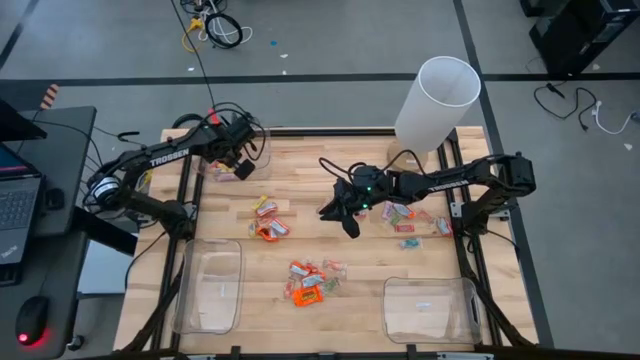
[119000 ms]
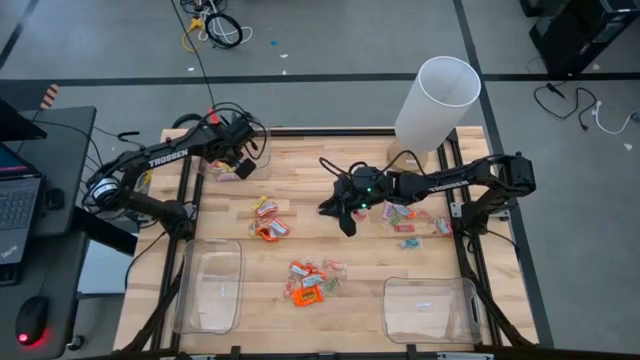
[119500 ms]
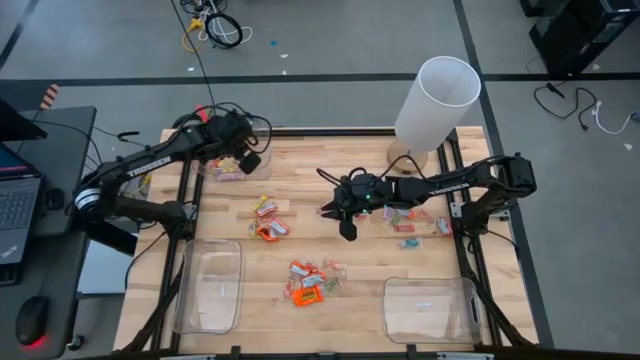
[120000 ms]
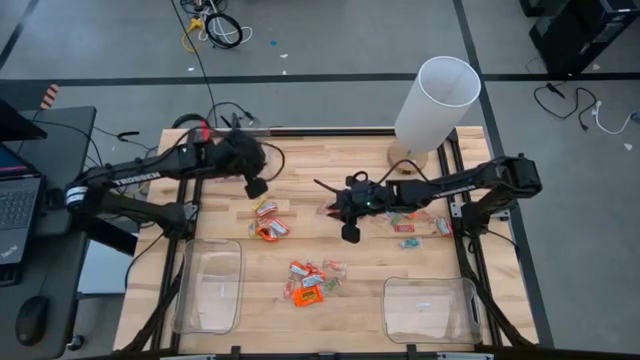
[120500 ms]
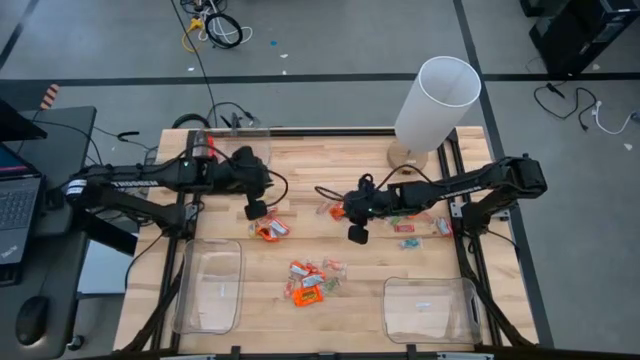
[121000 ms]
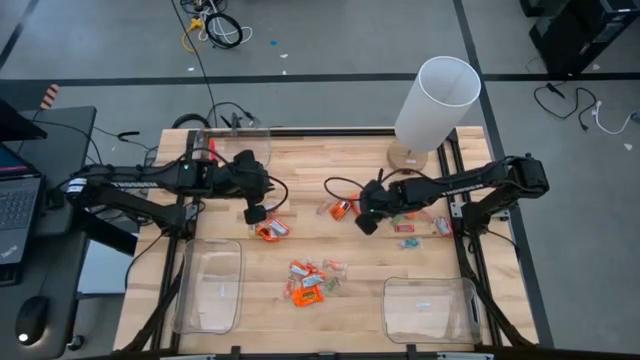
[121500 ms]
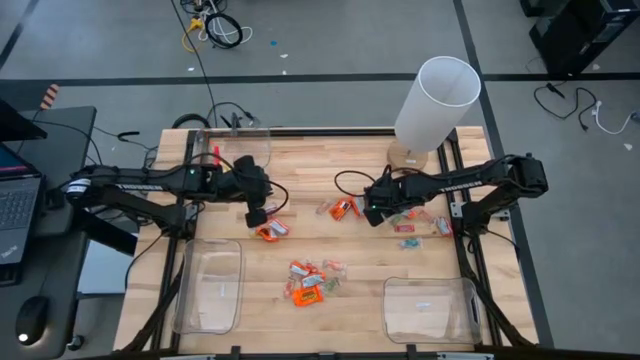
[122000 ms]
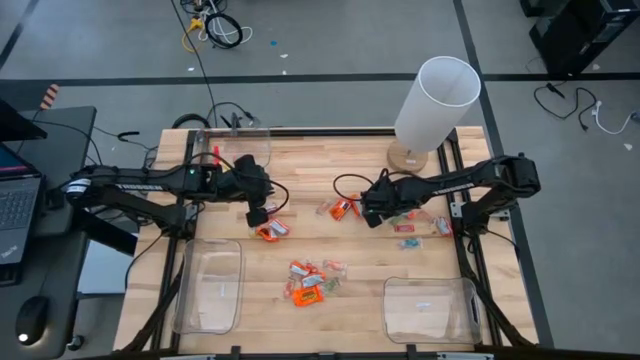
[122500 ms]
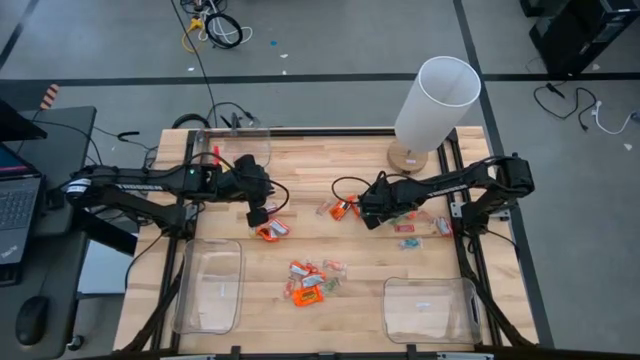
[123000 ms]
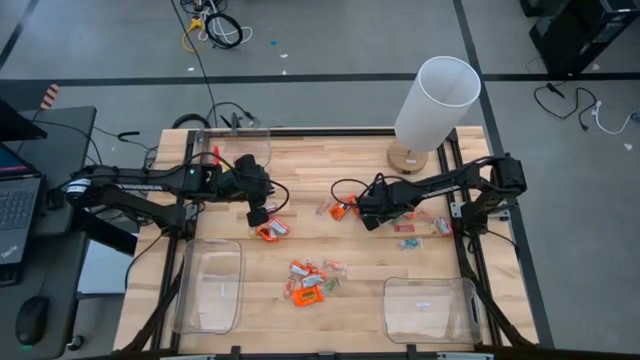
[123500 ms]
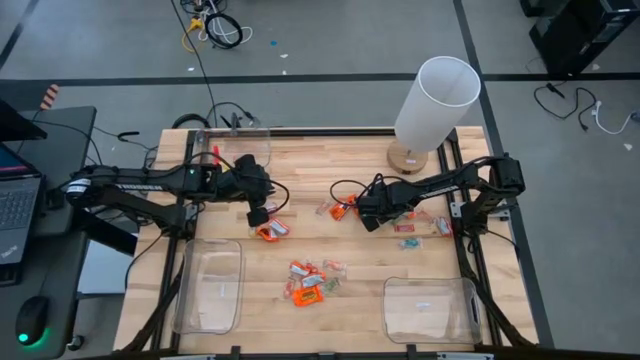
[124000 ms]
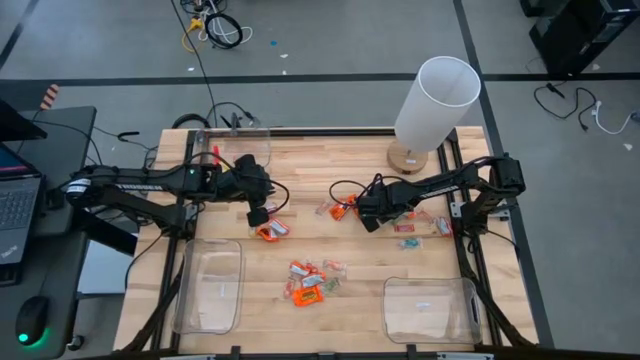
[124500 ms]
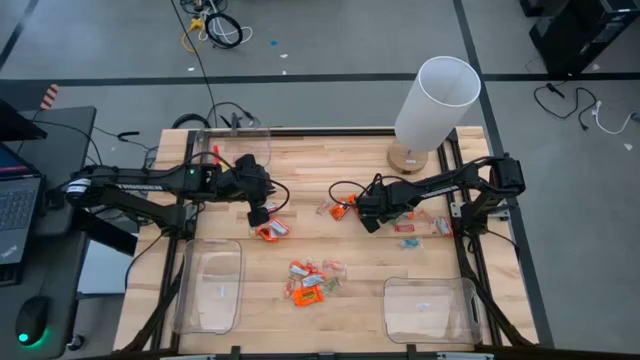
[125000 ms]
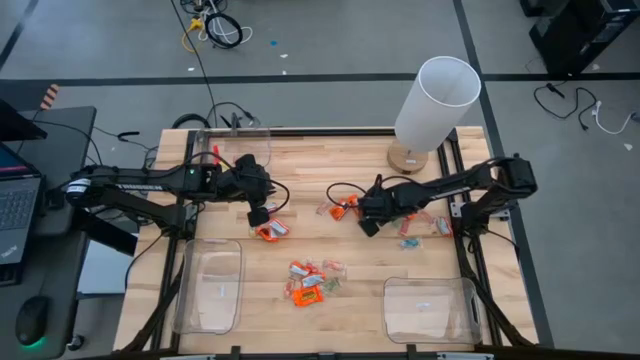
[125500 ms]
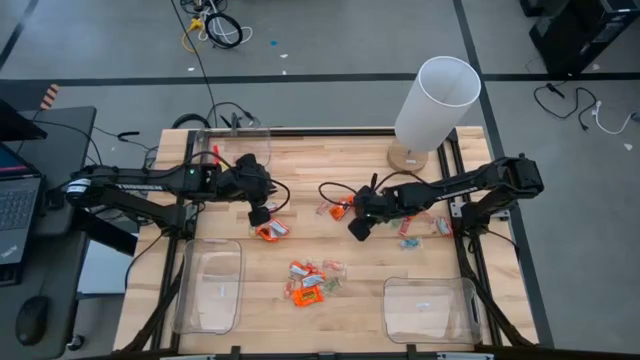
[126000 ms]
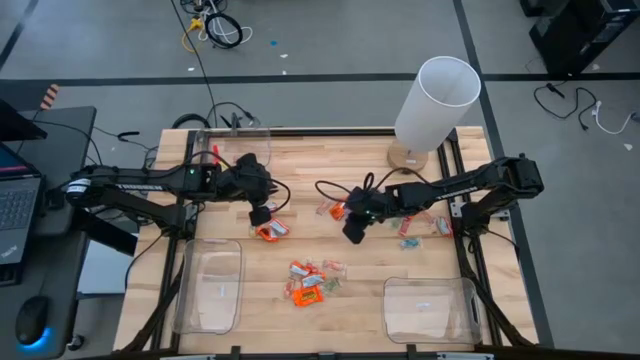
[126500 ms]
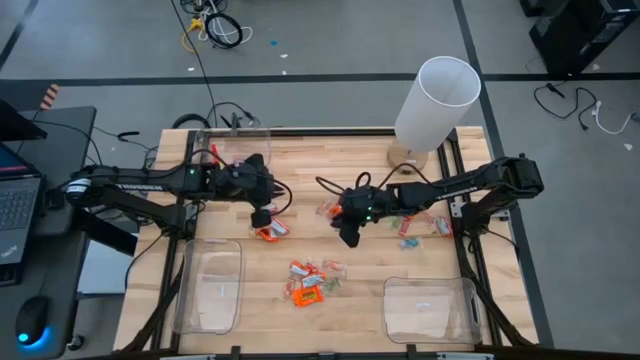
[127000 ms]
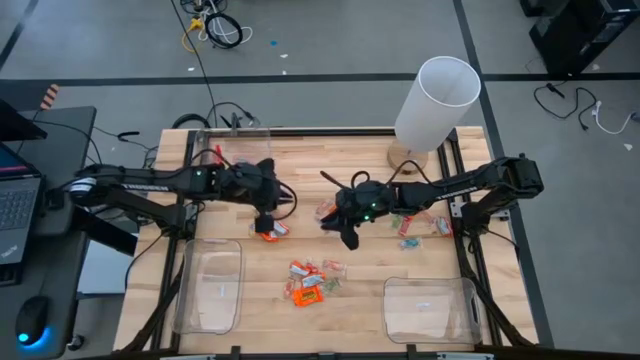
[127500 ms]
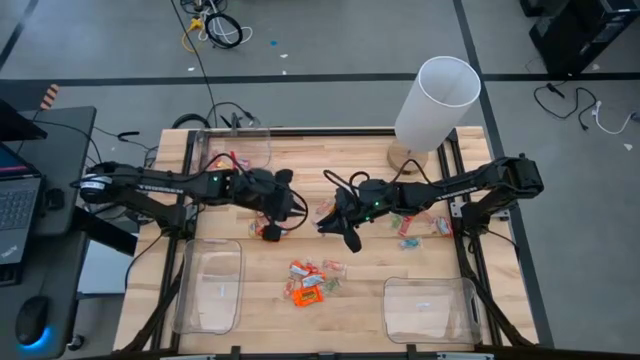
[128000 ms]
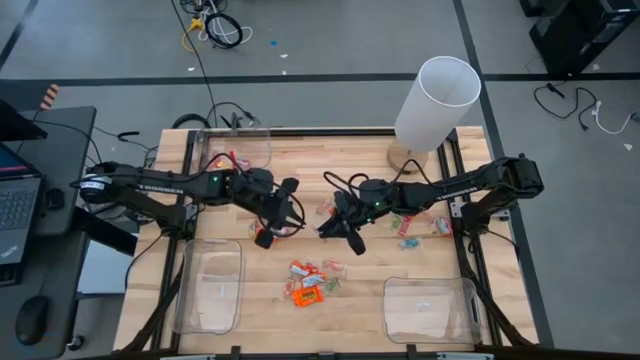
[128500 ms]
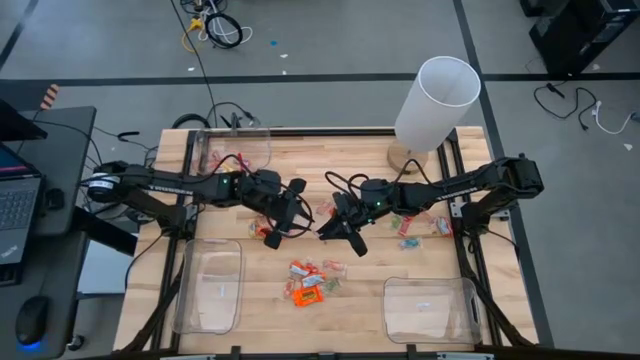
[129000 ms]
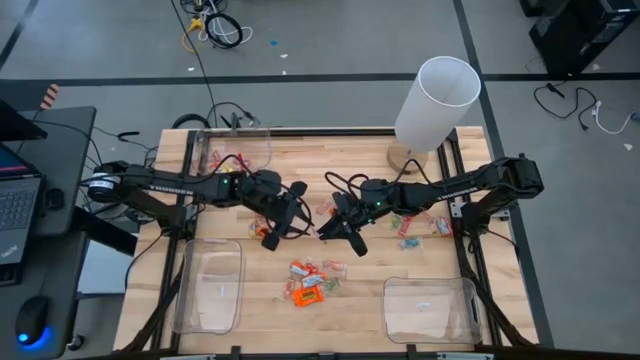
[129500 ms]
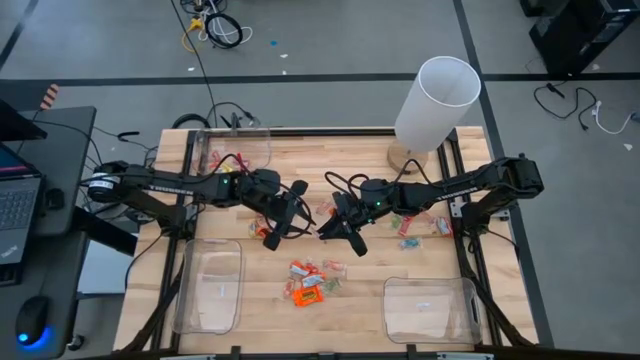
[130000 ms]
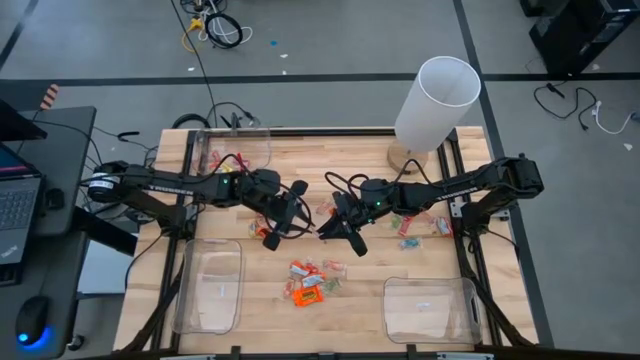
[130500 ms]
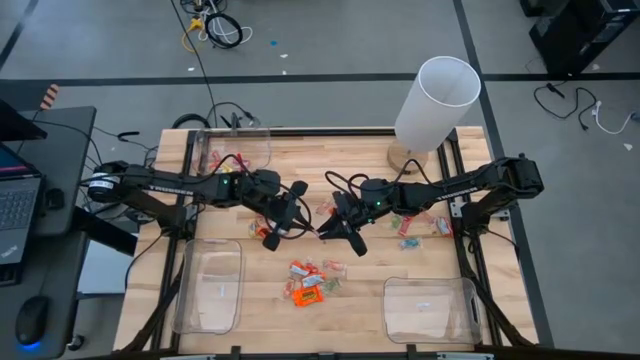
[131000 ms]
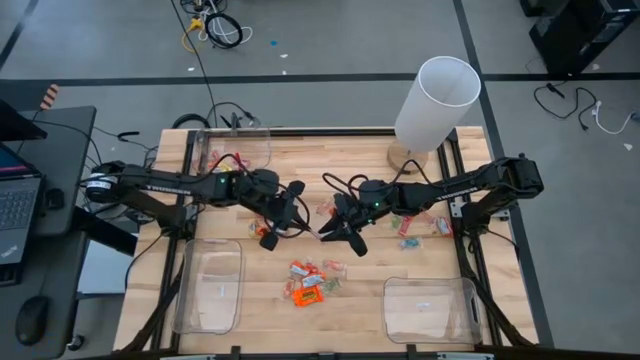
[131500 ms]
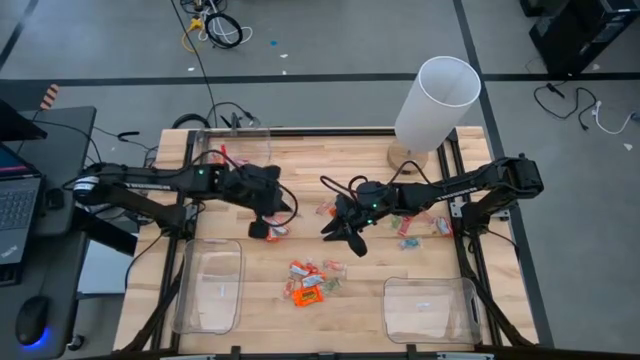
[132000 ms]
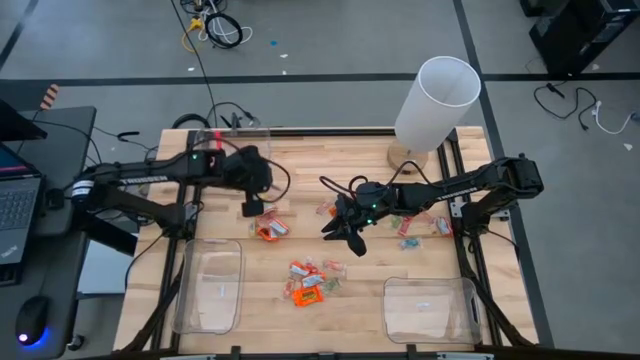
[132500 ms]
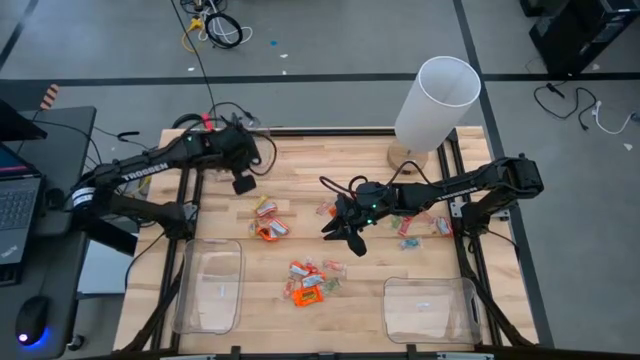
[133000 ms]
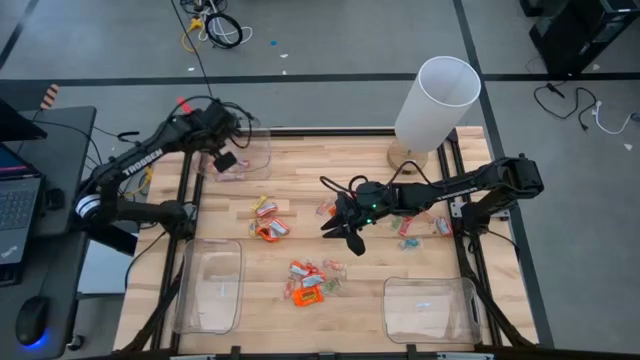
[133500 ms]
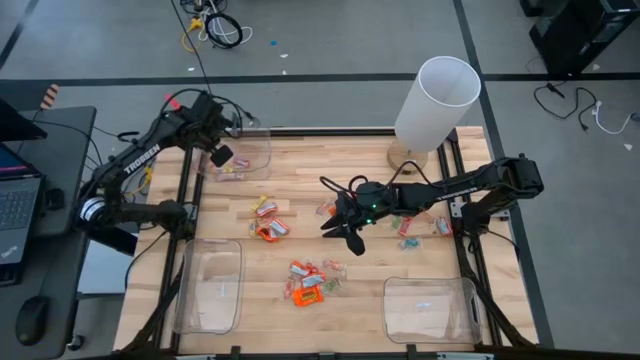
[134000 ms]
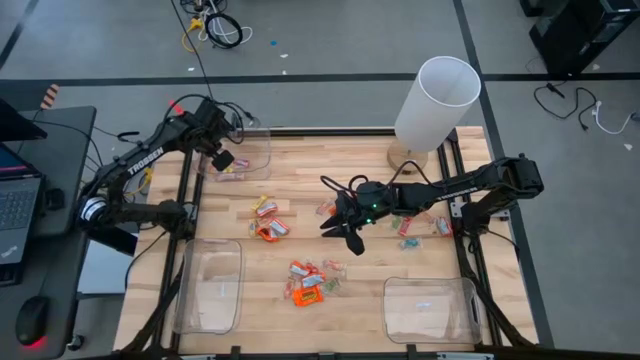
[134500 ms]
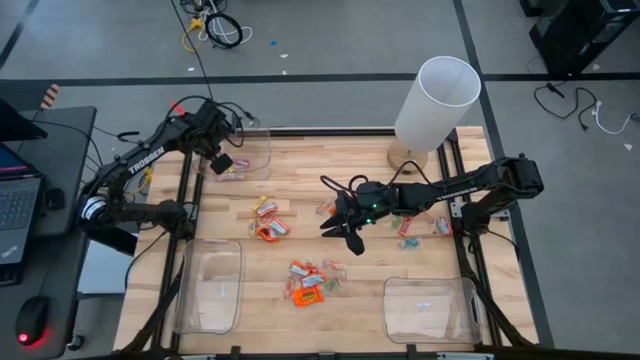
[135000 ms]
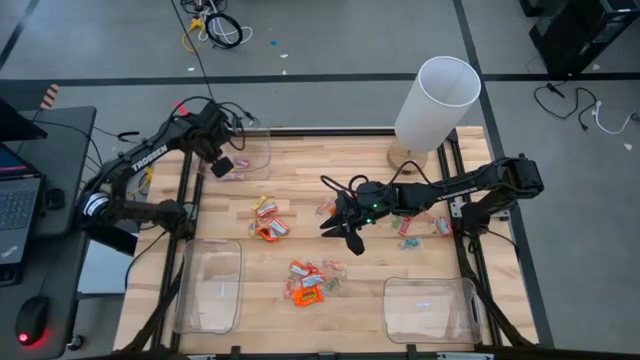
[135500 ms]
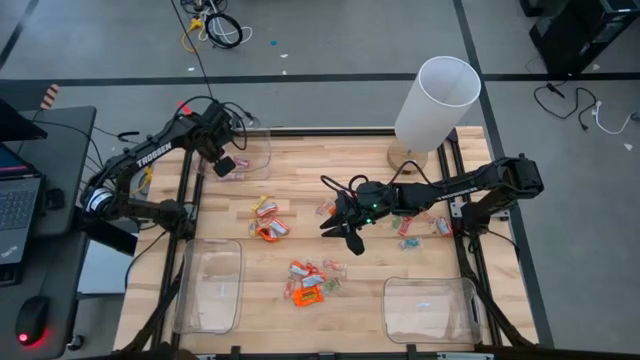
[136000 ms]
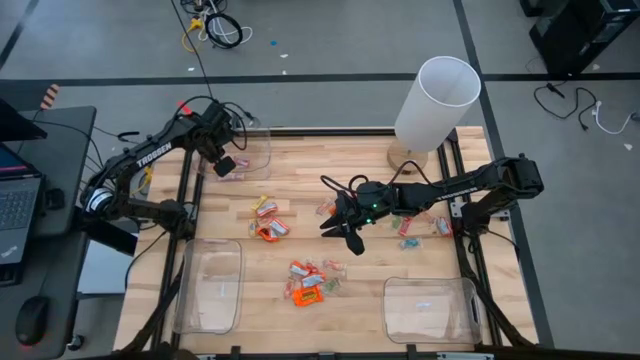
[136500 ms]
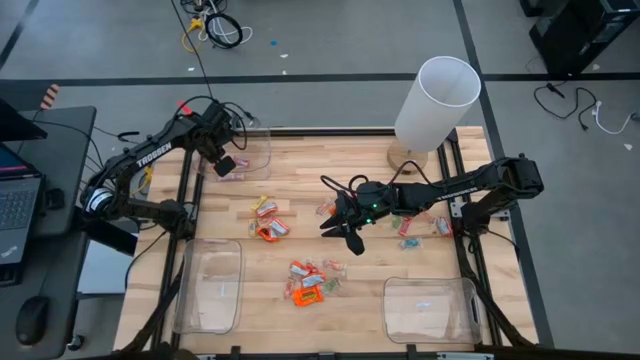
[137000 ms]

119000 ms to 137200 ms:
Task: Sort candy
Put the pink candy into the top left transparent bin

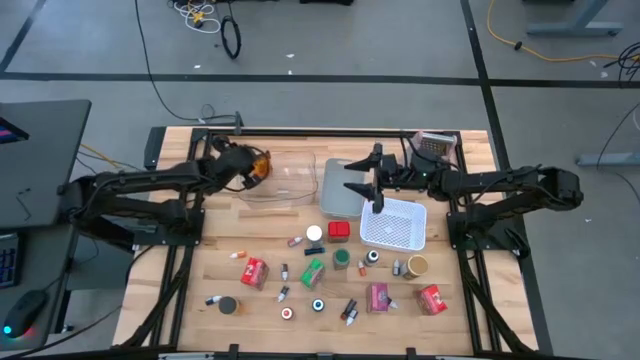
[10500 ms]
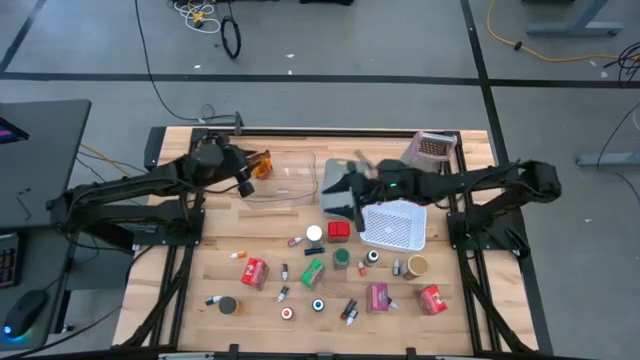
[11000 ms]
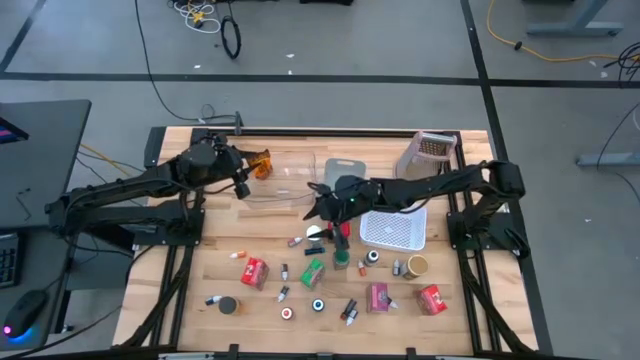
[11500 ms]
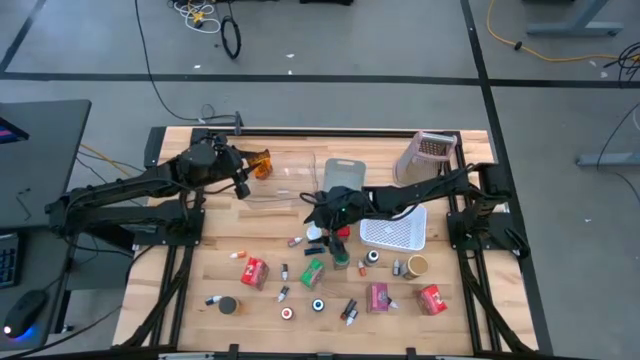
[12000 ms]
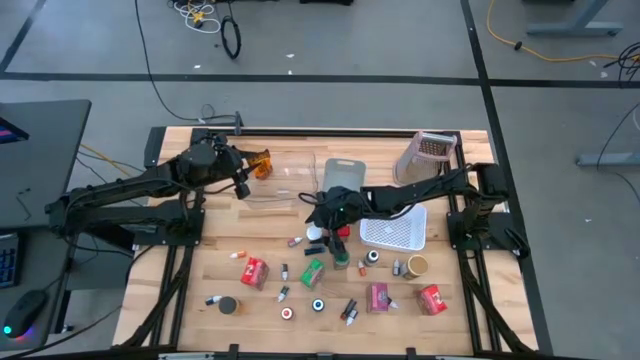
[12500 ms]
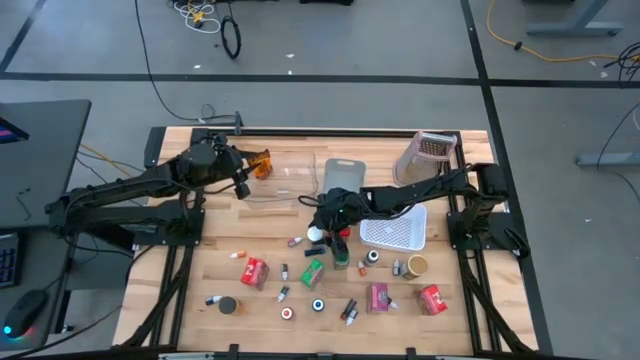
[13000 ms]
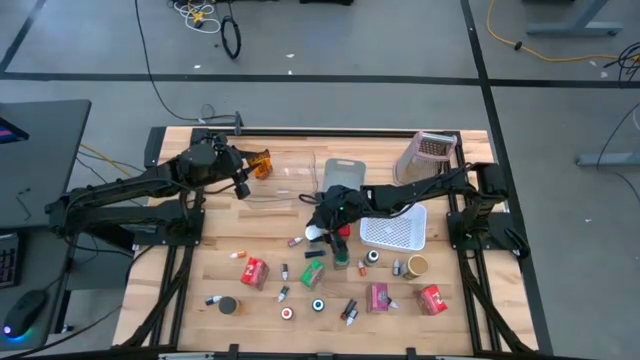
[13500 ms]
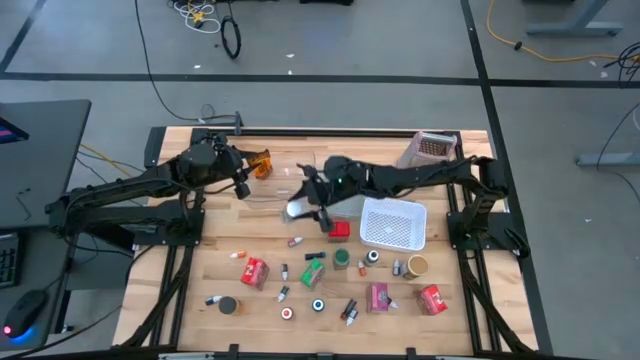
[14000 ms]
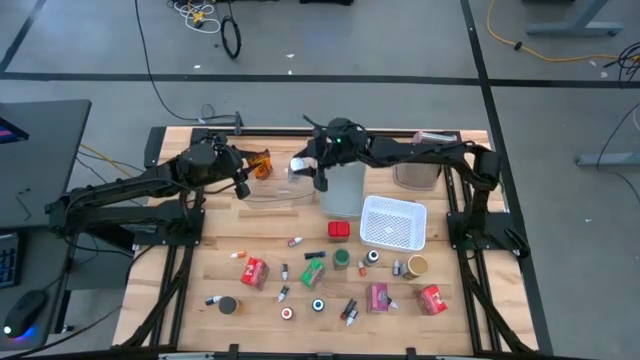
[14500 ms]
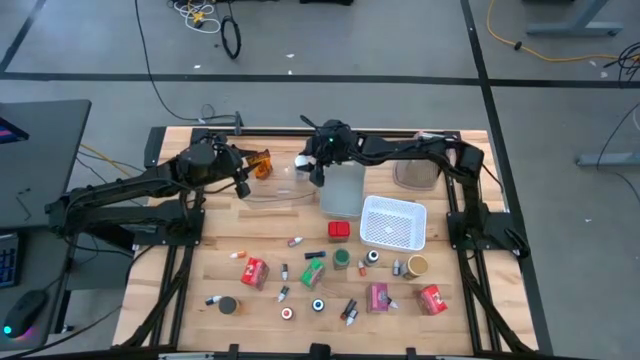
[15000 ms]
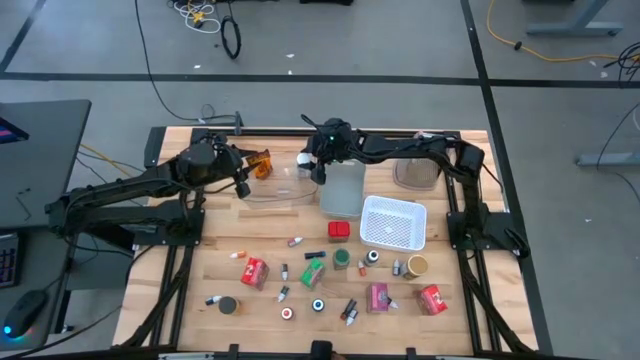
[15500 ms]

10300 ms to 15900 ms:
Task: Pick & Place Kitchen Items
Put the white seasoning bottle into the transparent bin
